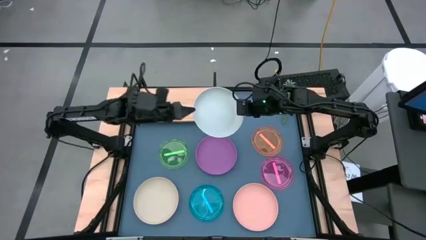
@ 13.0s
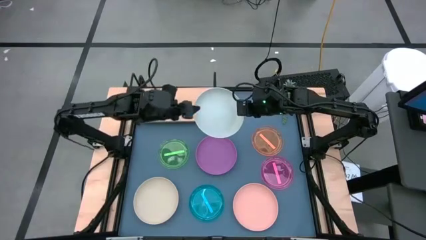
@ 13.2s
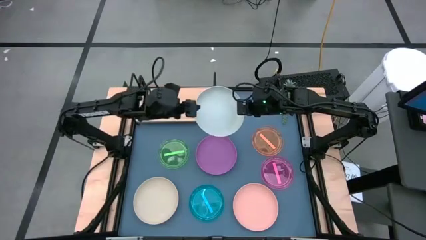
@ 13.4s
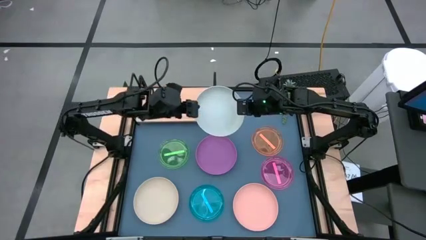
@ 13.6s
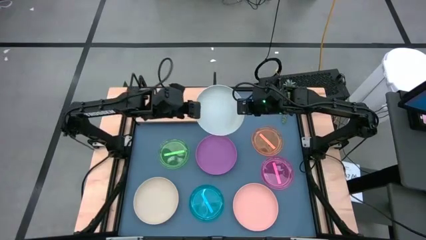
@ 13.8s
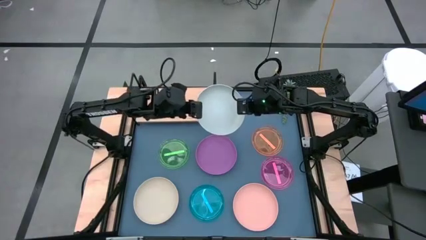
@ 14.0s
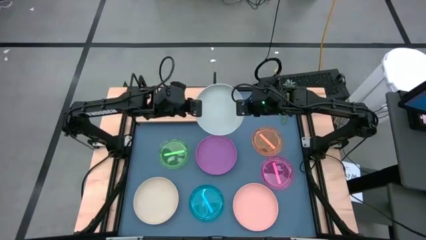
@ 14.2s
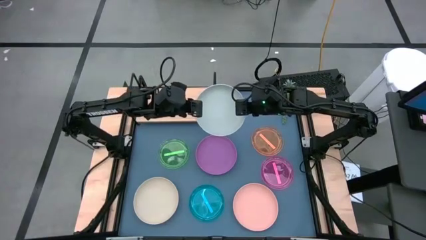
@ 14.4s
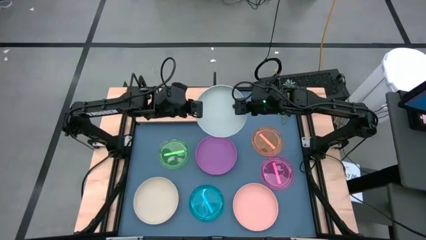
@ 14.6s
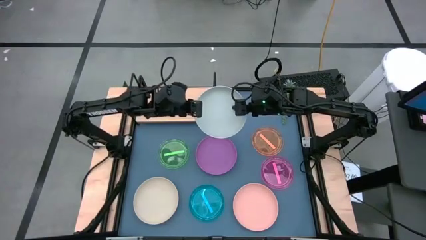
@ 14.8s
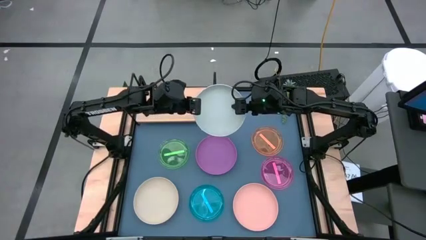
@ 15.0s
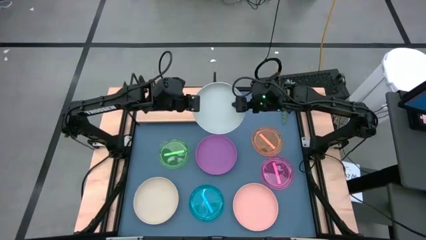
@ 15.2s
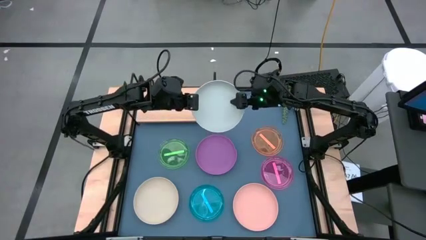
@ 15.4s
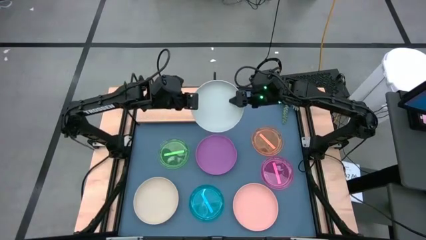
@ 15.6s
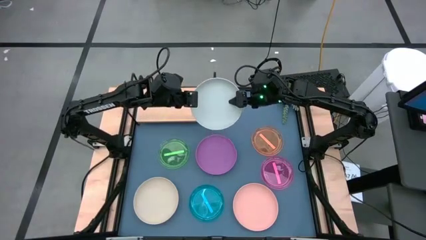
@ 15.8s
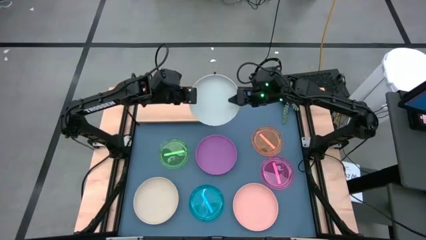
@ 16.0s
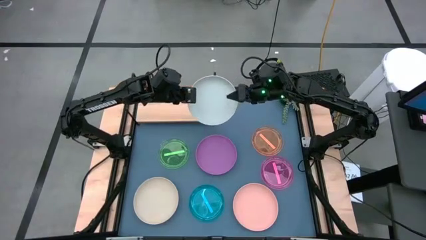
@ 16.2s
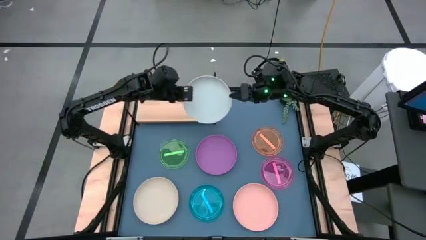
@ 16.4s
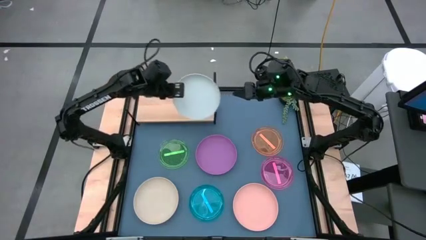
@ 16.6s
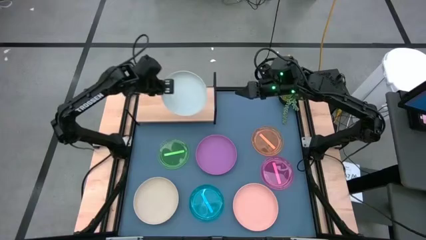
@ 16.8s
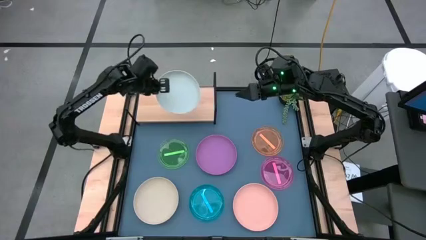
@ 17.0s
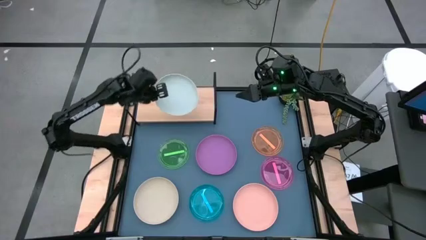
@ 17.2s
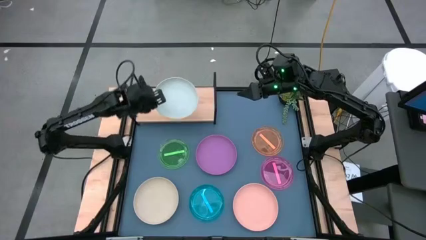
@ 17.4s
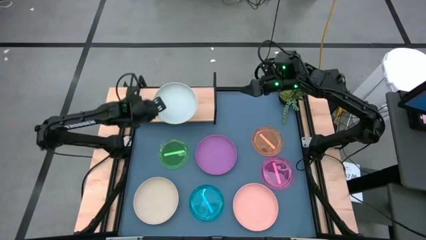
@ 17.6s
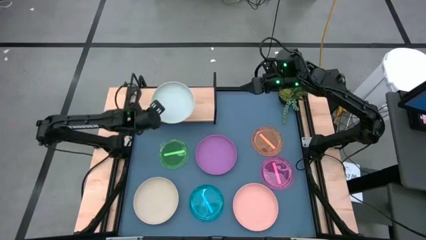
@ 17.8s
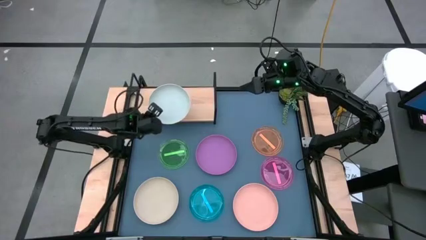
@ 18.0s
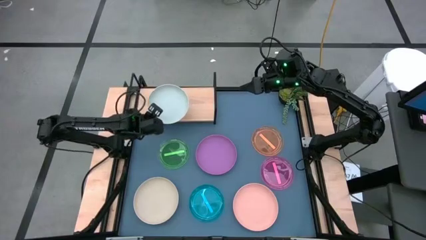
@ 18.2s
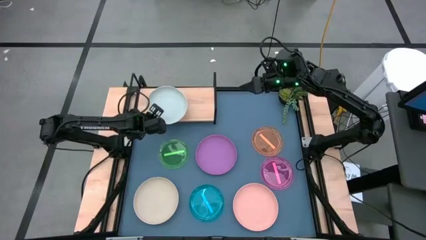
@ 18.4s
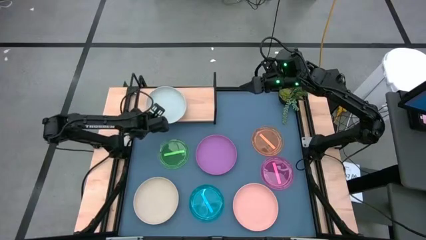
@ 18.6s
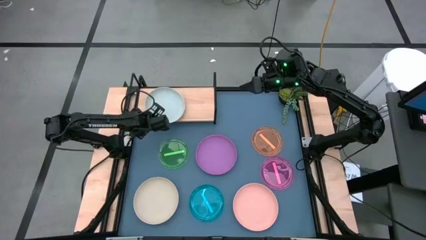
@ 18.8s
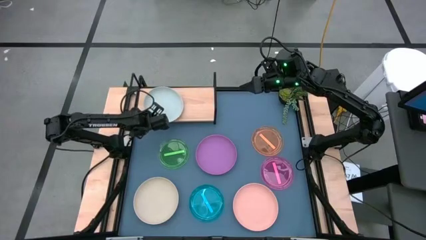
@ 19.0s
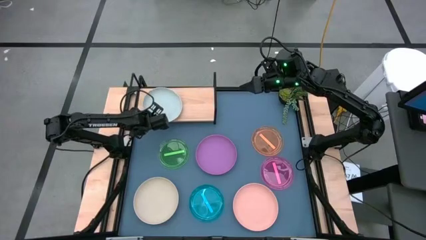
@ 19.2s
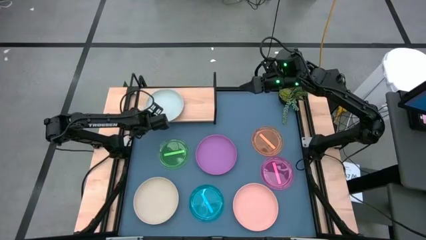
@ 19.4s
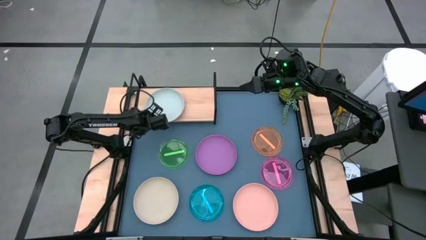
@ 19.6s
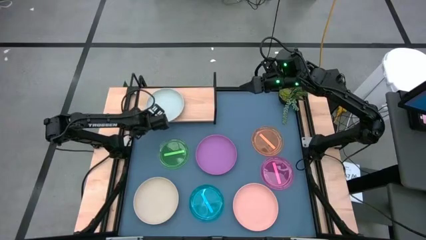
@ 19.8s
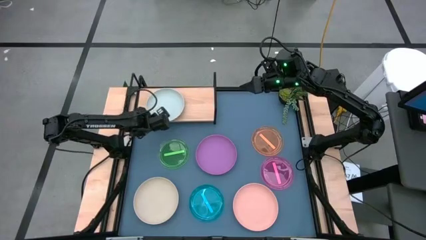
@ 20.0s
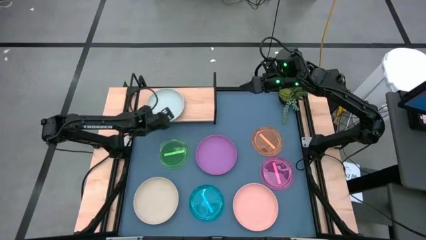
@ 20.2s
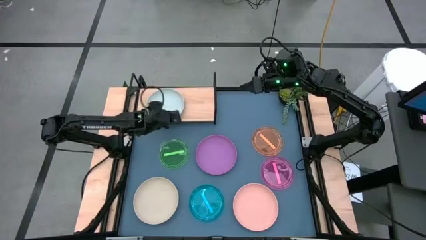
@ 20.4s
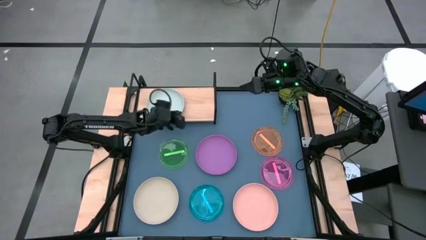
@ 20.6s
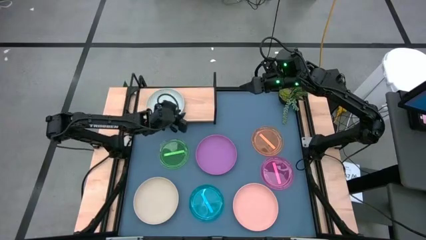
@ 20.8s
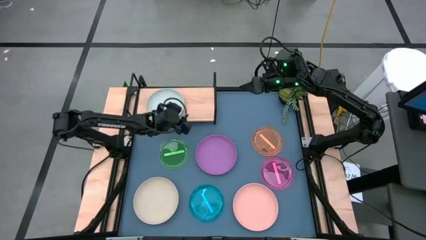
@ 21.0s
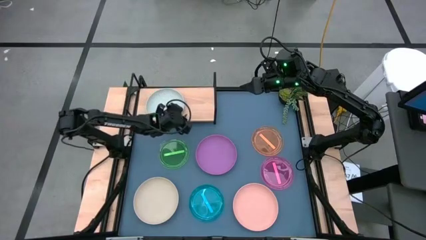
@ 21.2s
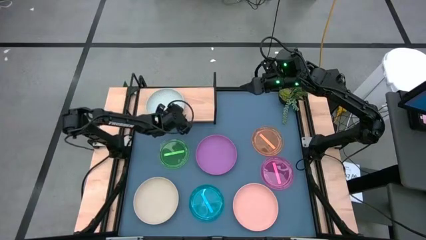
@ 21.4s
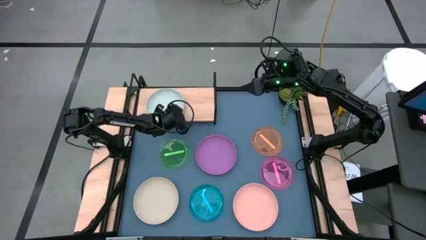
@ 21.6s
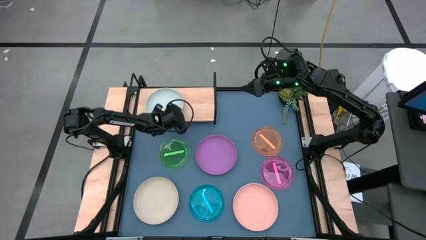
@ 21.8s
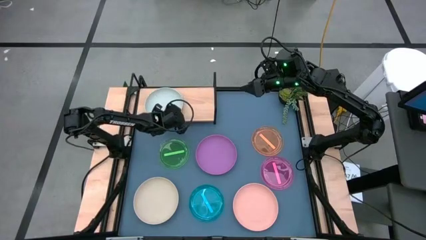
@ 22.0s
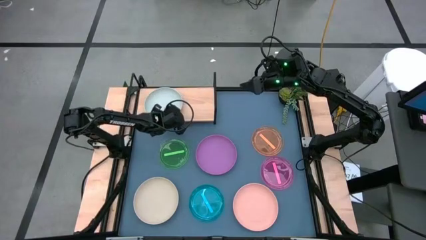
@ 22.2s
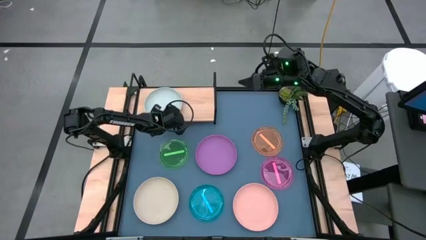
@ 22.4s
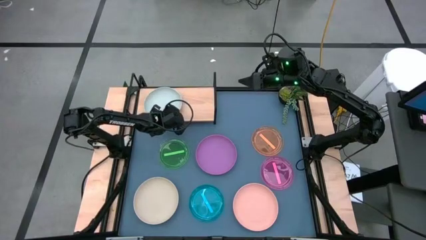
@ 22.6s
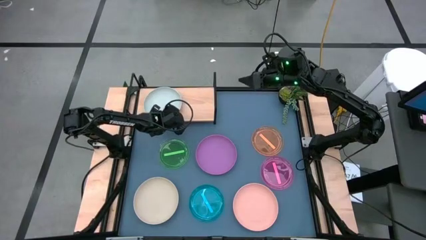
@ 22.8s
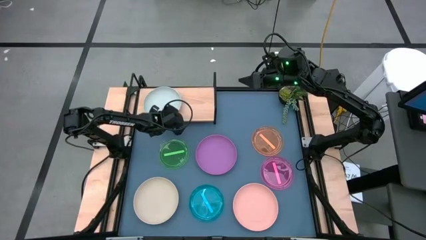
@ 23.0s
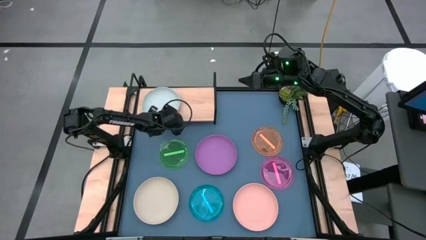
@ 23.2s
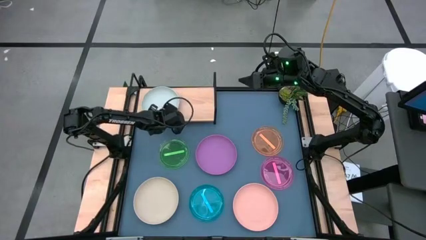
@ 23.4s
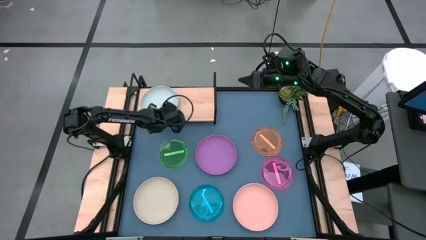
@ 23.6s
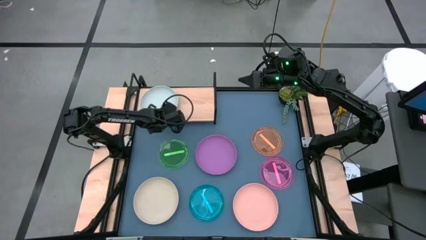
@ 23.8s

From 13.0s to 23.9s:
Task: Place and stack plates onto a shelf
Put the gray plate on the shelf

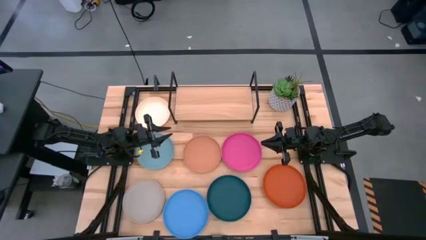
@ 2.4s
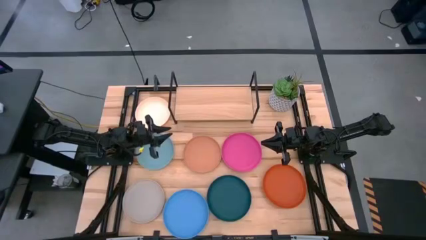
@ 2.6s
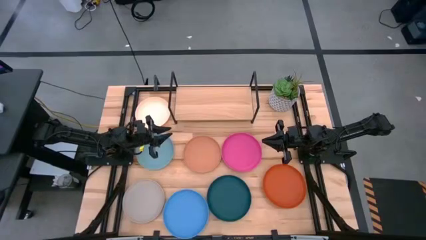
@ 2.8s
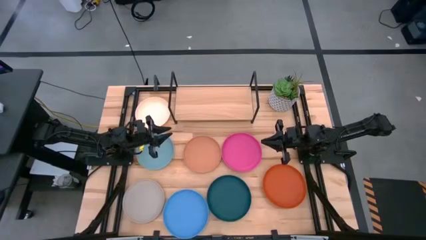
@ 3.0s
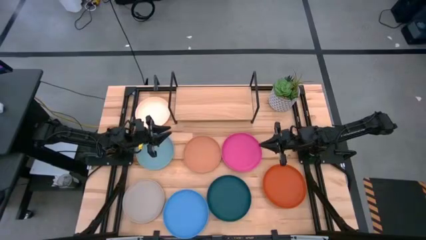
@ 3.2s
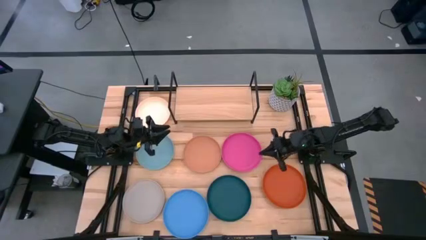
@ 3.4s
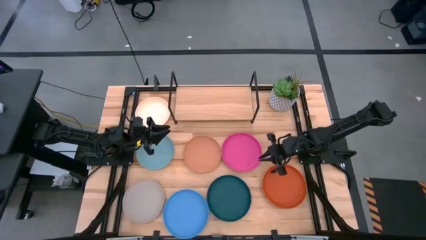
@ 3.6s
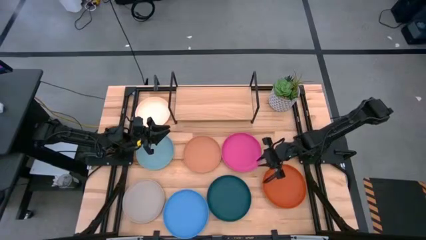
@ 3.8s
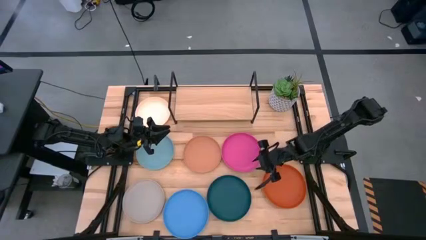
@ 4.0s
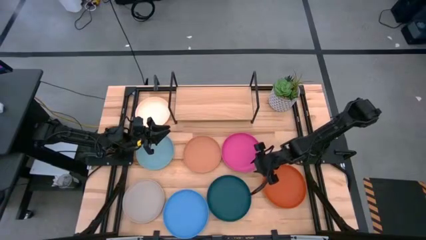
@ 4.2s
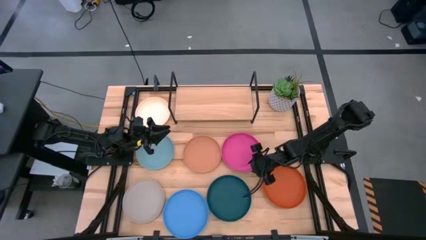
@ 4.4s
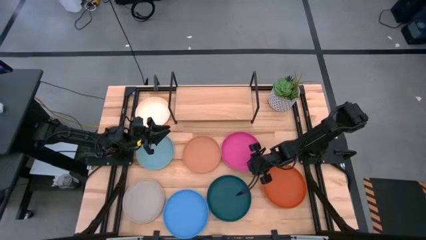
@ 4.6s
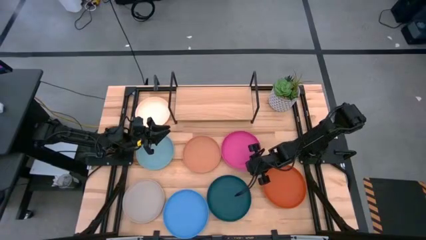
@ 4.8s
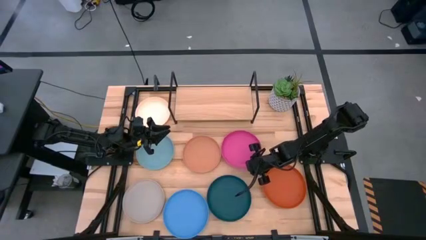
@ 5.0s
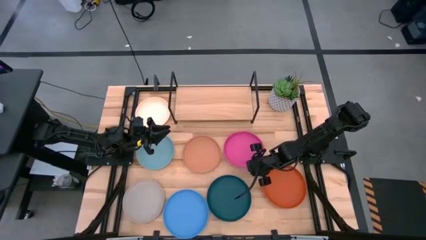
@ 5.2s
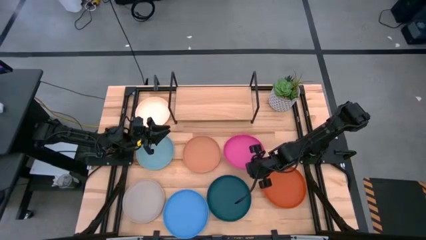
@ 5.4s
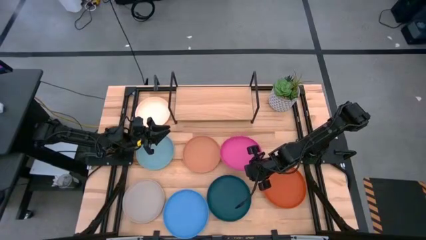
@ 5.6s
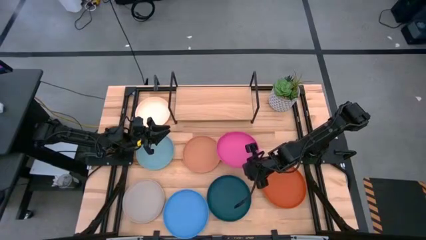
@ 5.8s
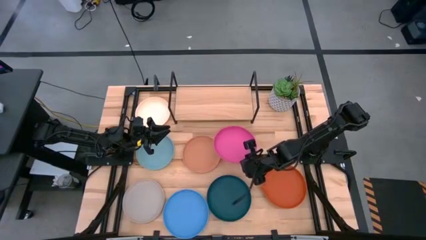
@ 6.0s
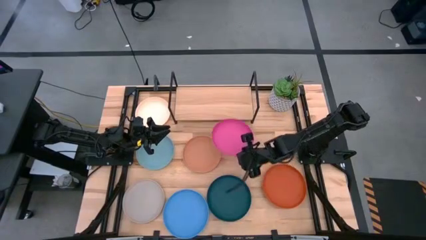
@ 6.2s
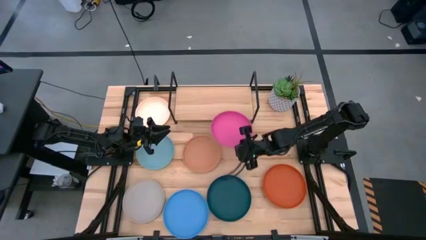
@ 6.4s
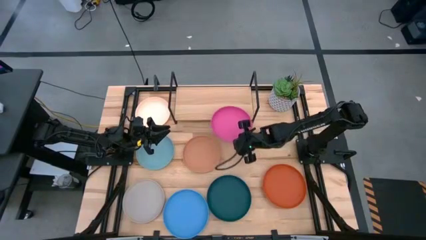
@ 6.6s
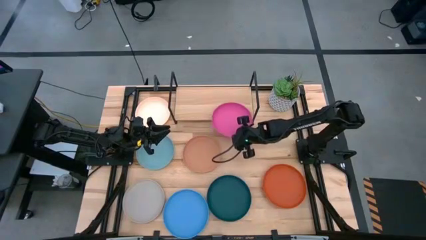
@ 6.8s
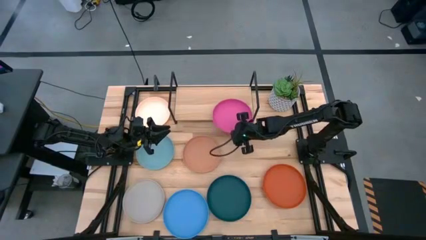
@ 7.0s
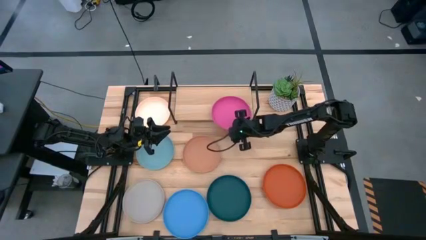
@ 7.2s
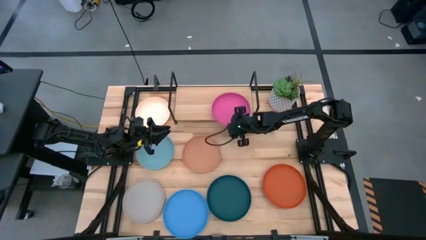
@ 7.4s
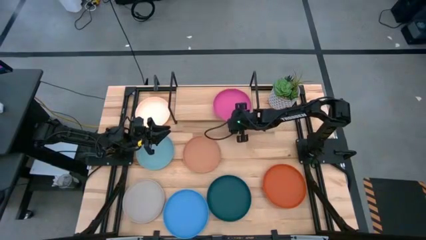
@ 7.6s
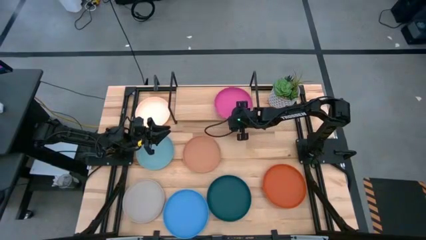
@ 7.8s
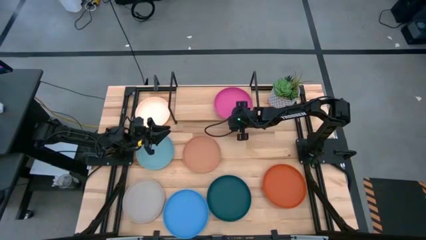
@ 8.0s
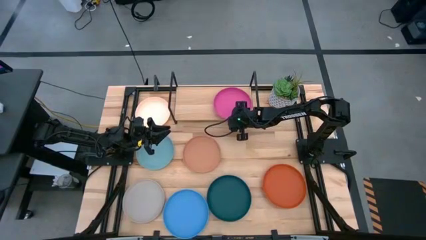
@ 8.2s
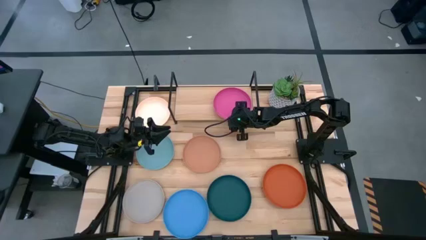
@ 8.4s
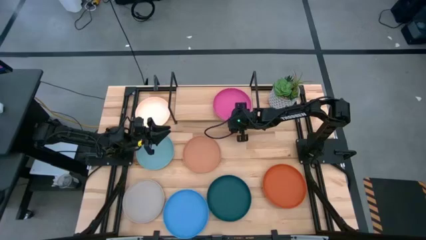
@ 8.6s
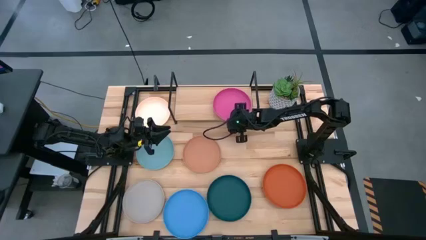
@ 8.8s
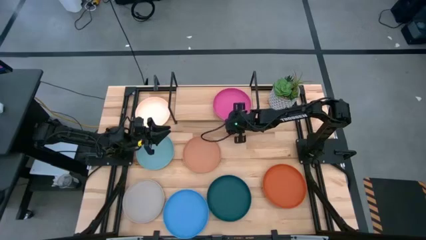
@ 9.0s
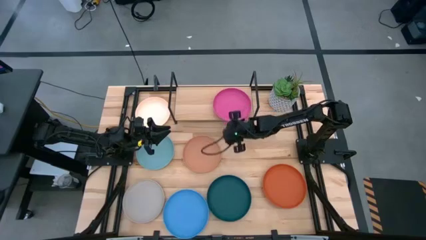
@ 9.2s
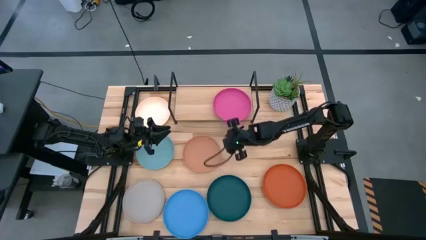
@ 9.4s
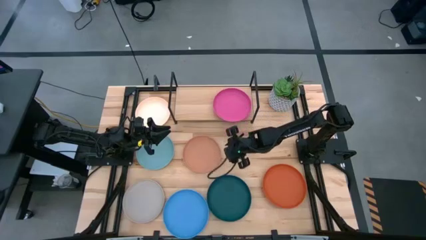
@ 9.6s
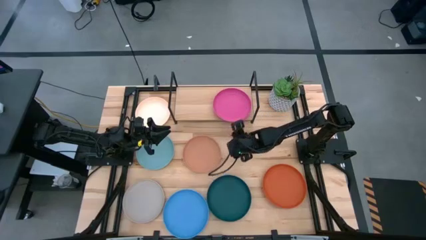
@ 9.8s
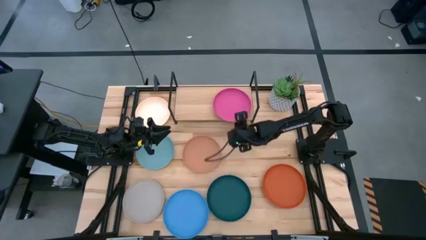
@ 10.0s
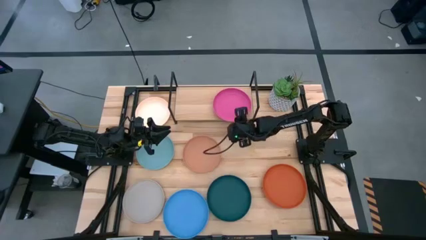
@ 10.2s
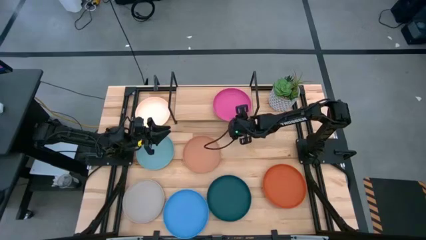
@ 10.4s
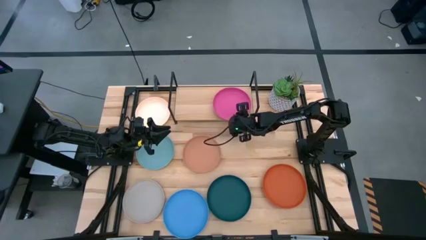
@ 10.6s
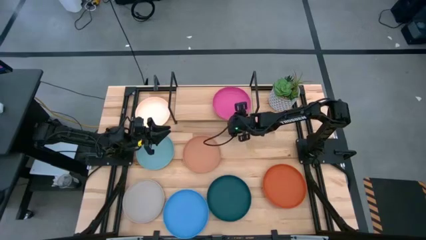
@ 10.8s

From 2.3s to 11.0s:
Task: Place and stack plates onto a shelf
Put the pink plate on the shelf
